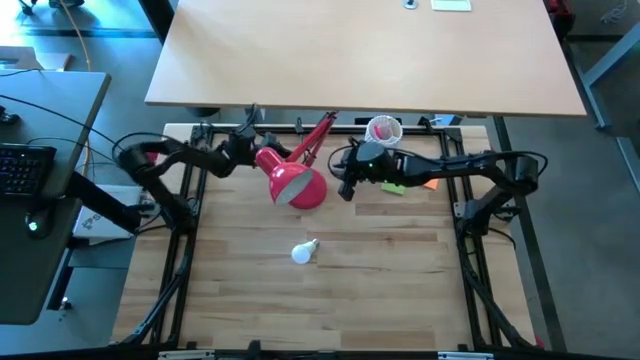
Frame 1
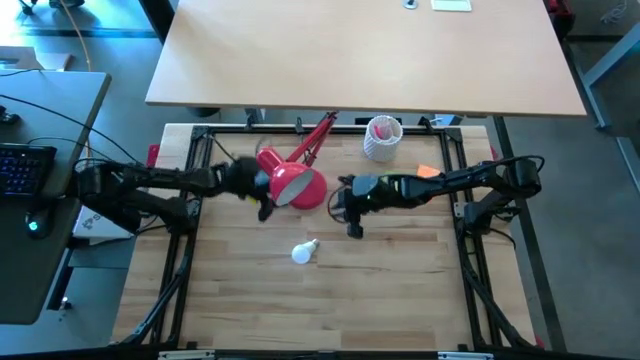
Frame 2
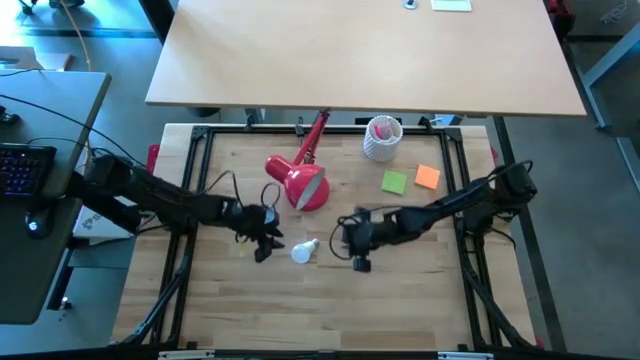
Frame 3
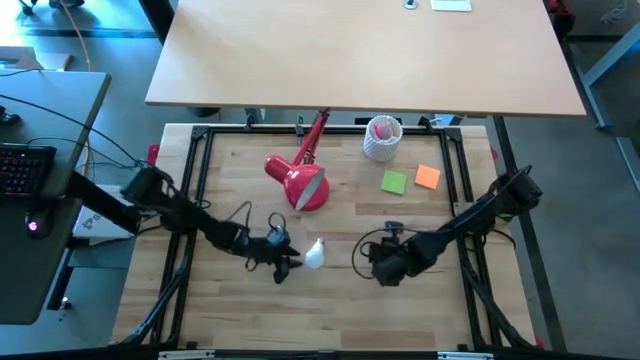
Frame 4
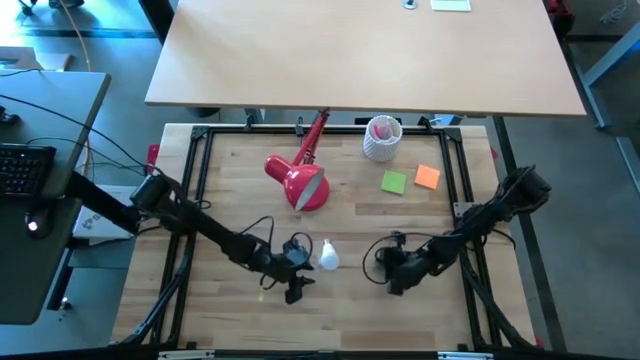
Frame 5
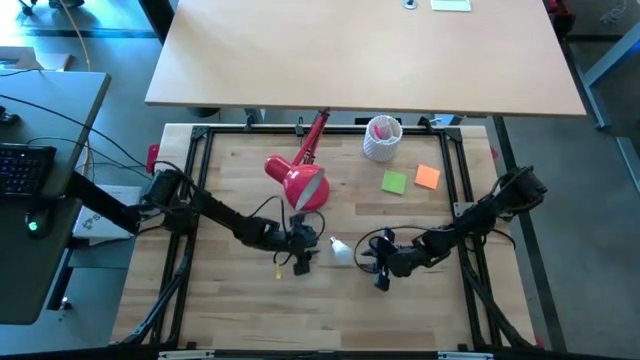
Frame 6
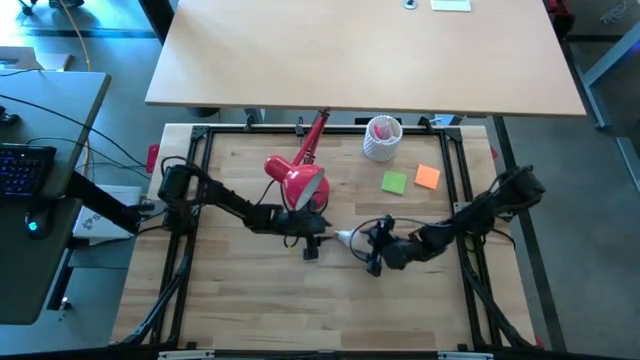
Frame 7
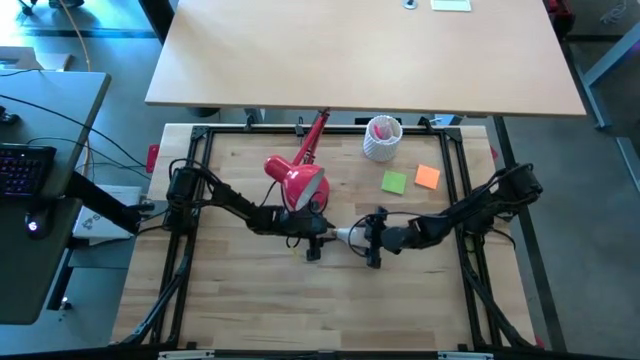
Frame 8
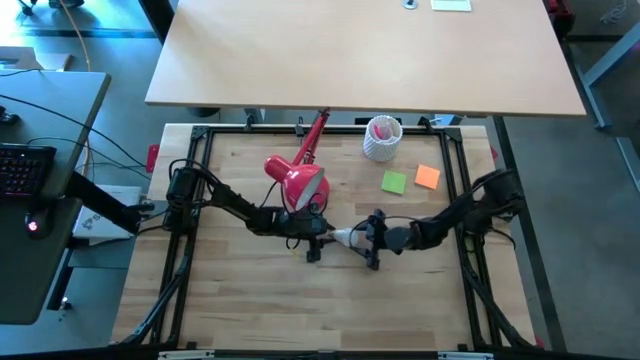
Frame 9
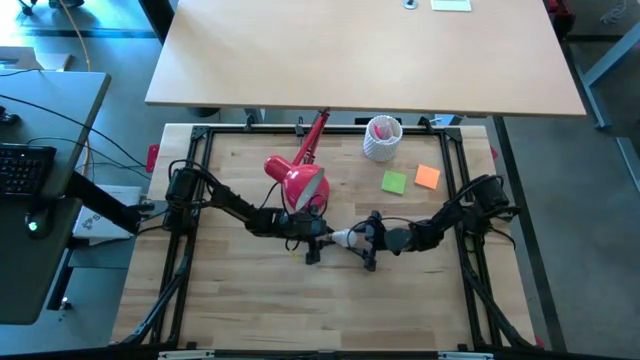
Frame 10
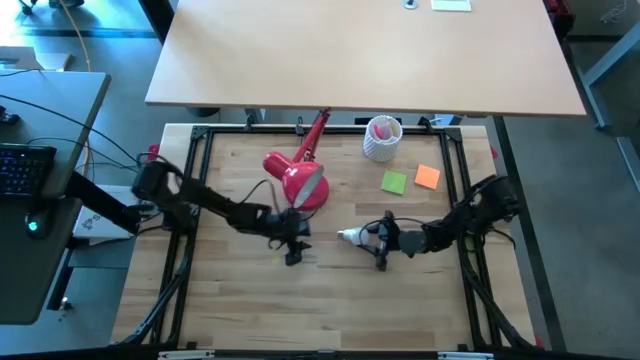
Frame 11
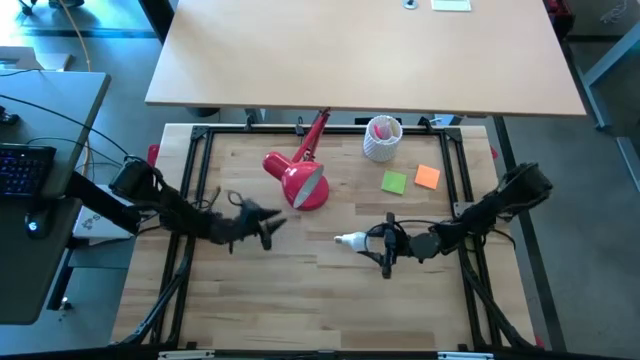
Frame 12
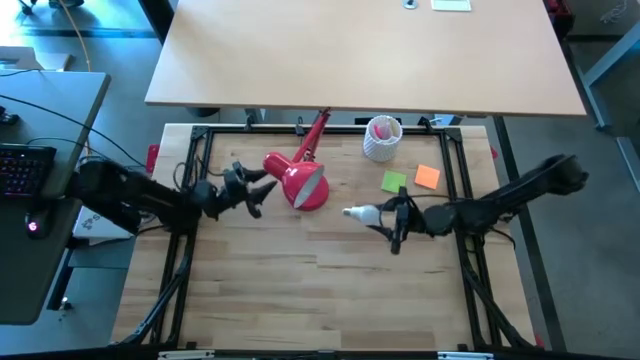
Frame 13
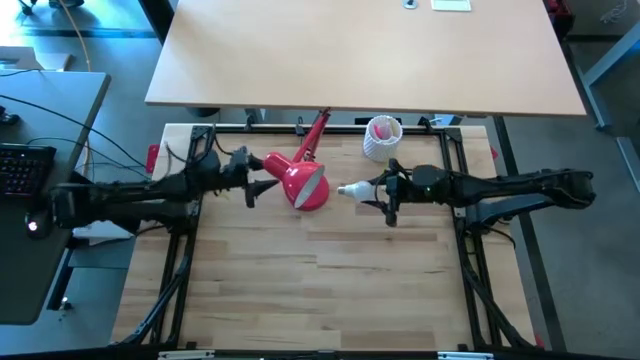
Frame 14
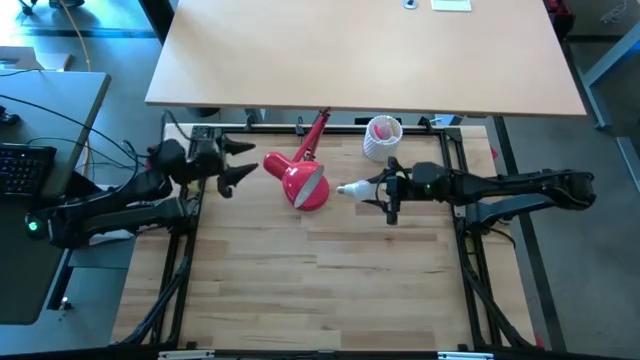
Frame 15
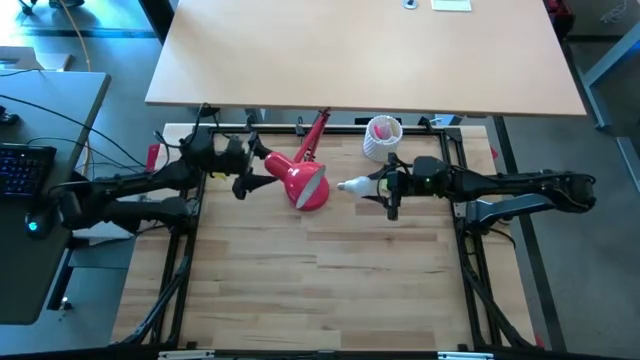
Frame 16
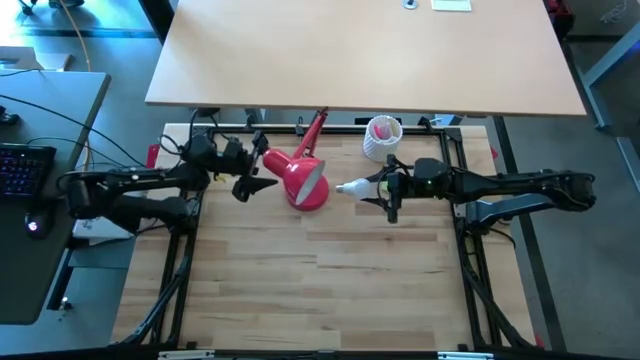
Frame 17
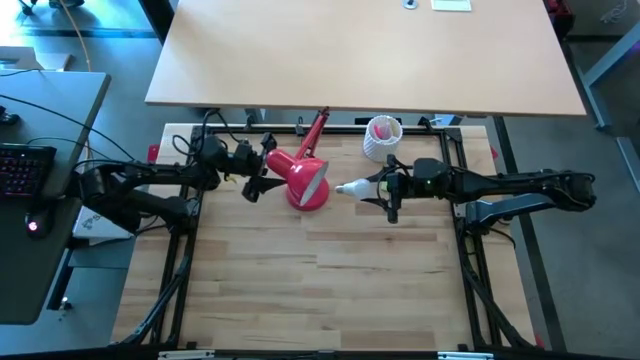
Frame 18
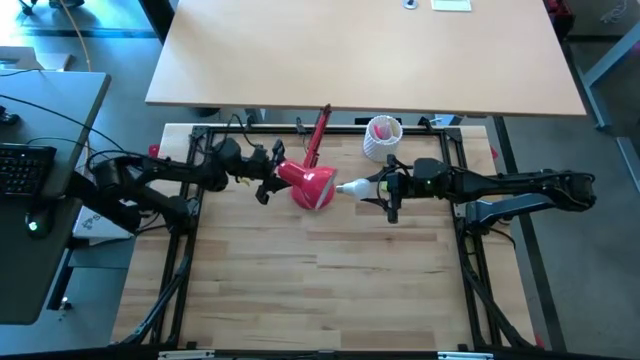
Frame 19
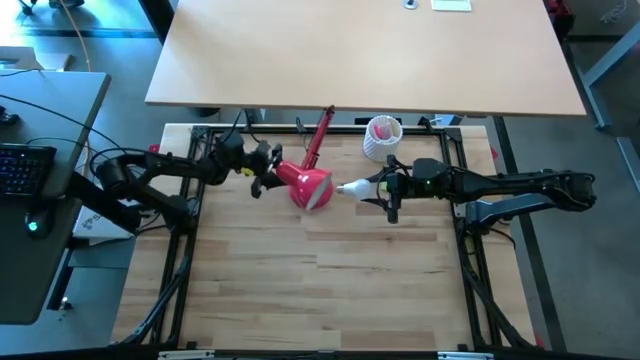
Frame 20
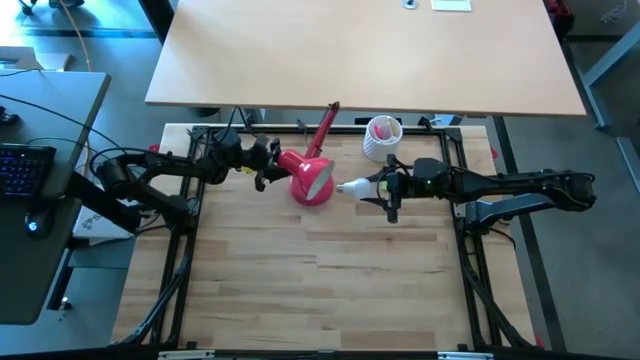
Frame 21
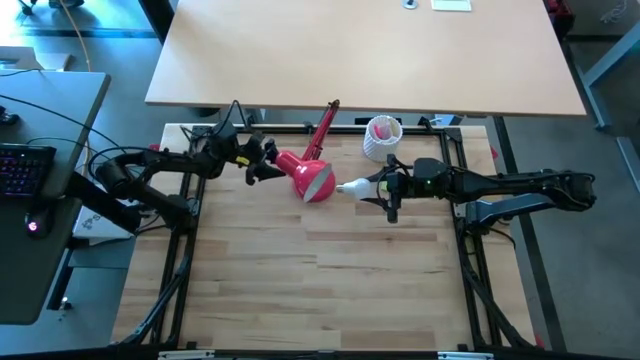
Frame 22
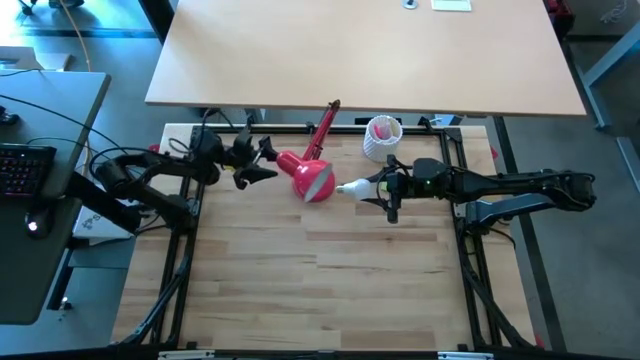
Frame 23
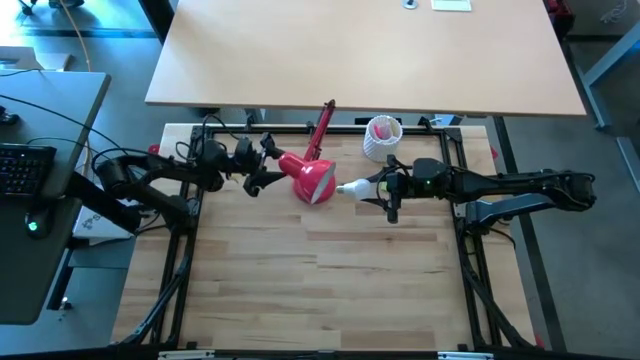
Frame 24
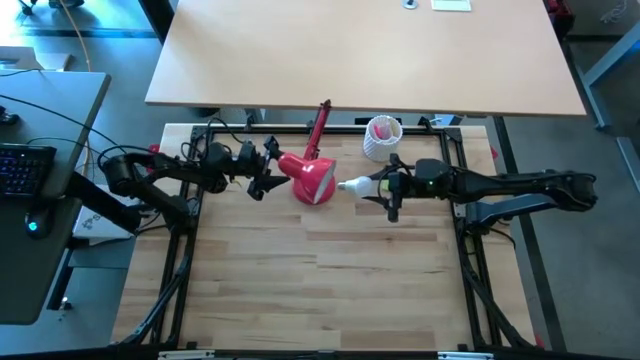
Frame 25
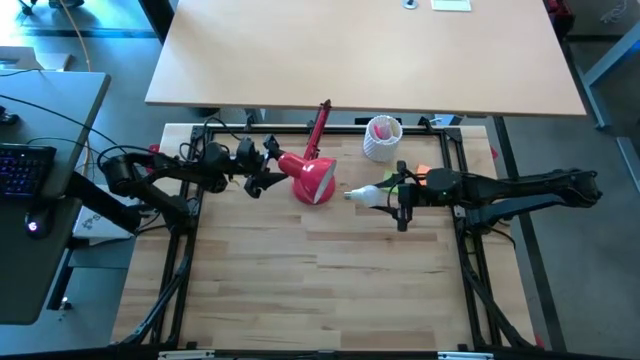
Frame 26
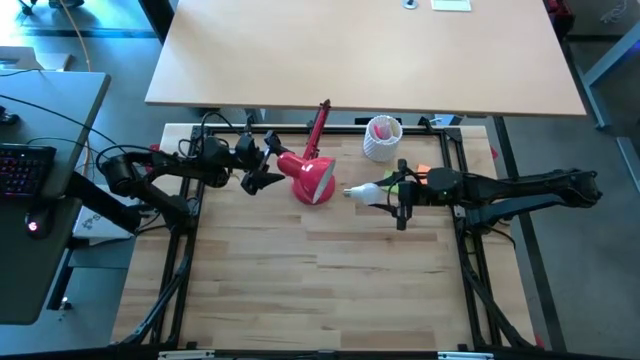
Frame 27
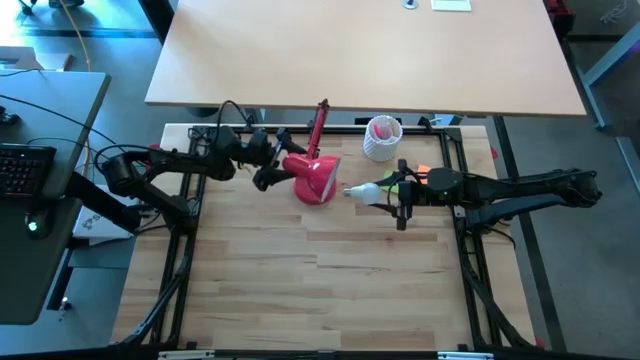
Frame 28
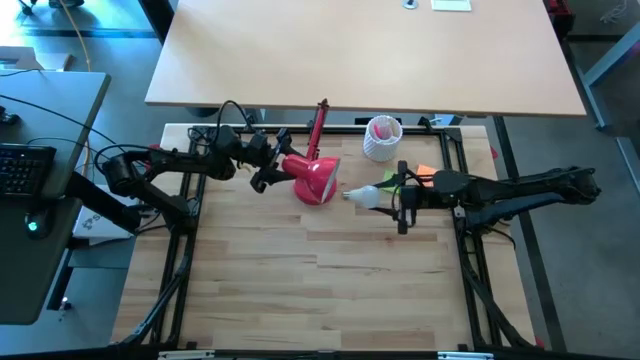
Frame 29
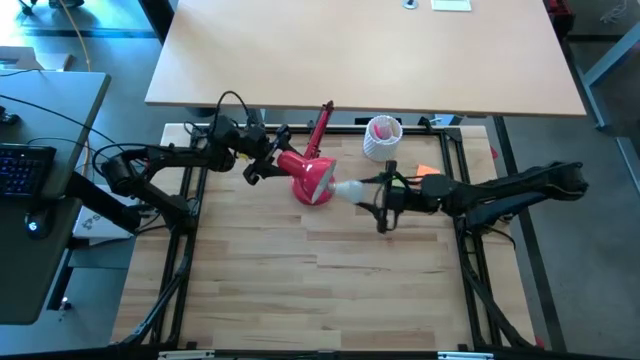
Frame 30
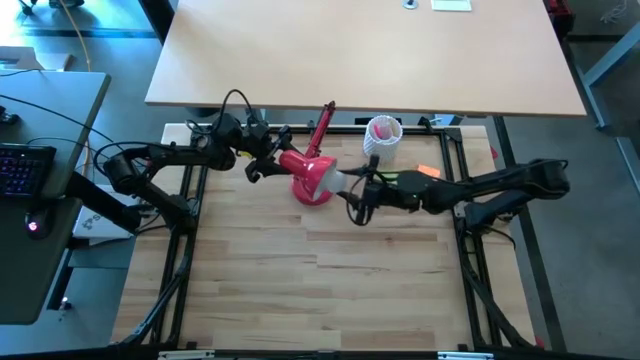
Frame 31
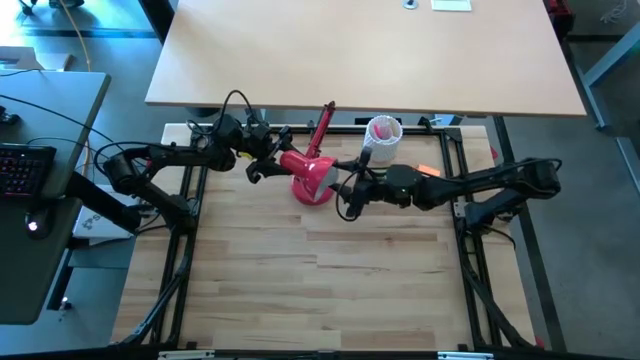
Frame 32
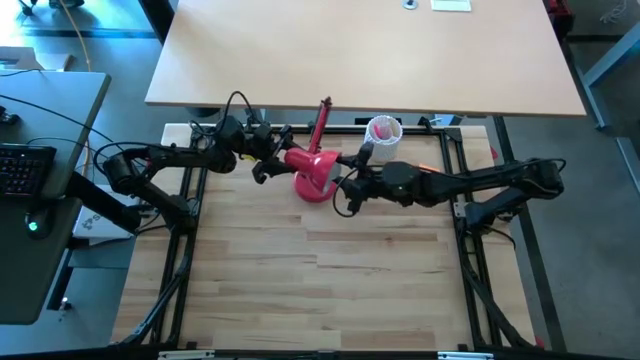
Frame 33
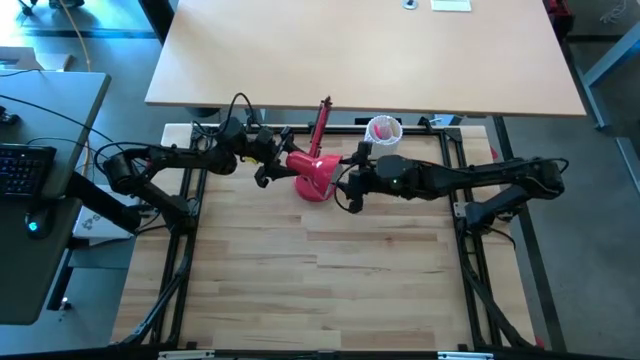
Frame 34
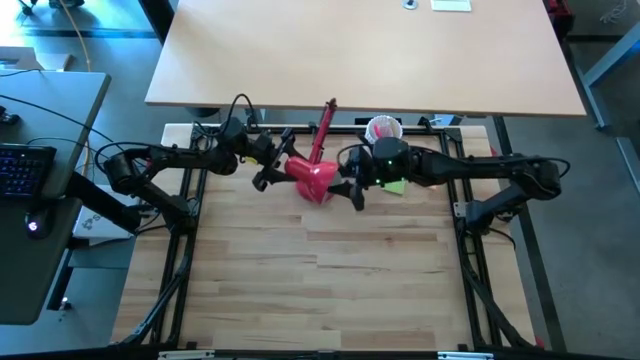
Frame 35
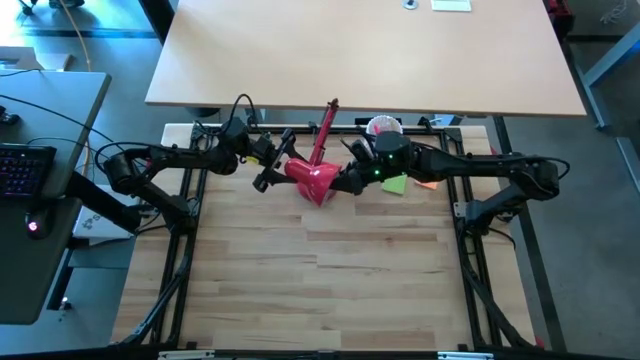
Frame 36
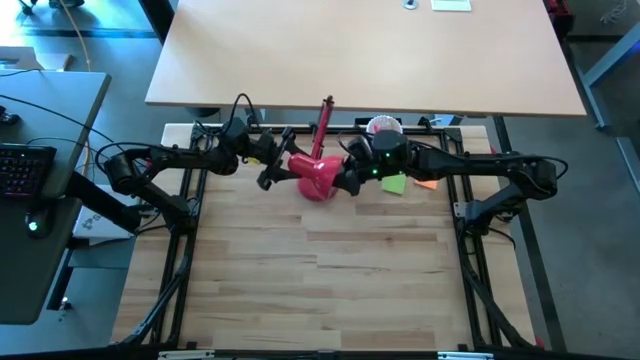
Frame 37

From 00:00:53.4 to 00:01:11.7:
Task: Screw lightbulb
Insert the lightbulb into the red lamp

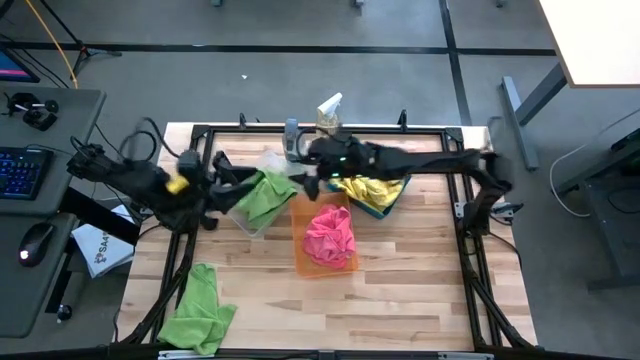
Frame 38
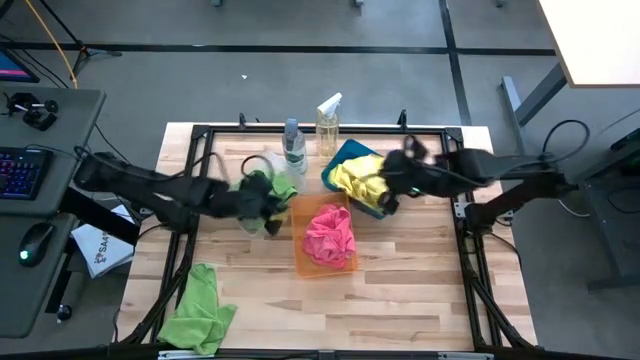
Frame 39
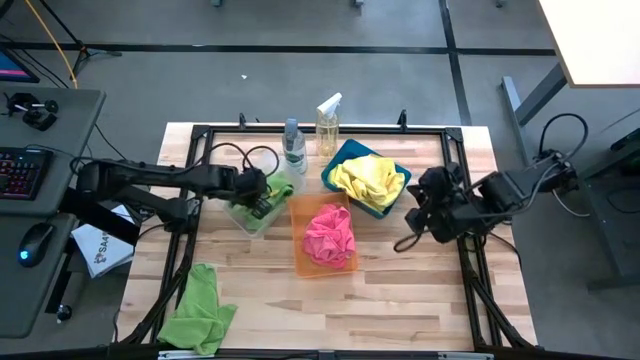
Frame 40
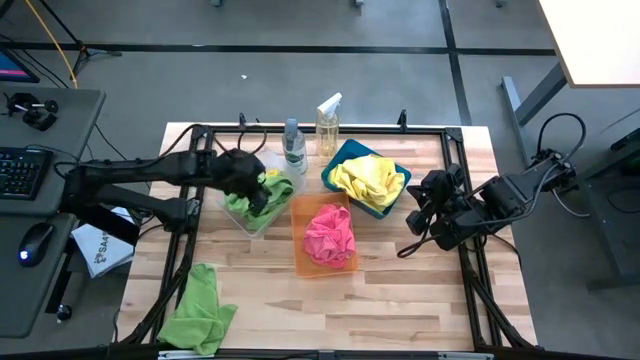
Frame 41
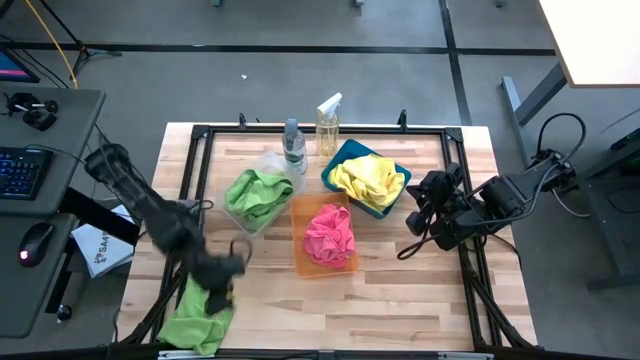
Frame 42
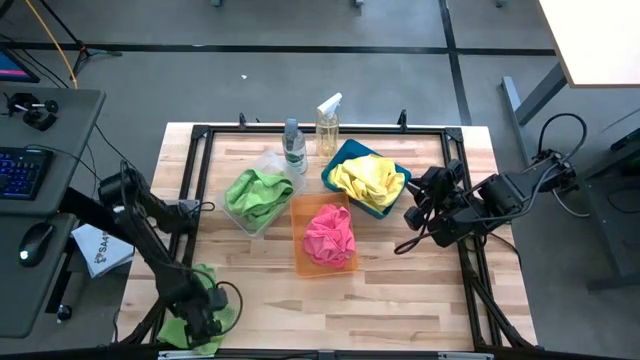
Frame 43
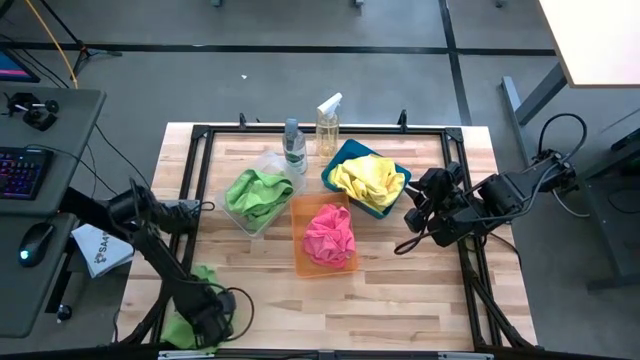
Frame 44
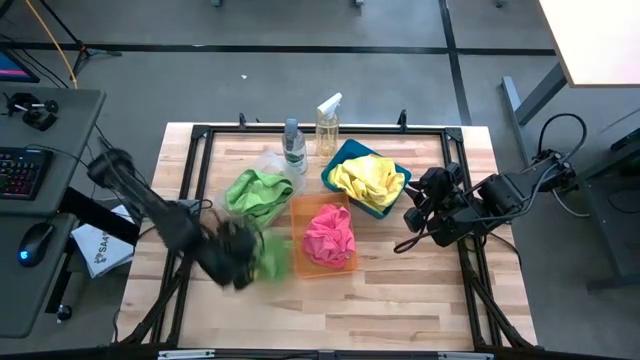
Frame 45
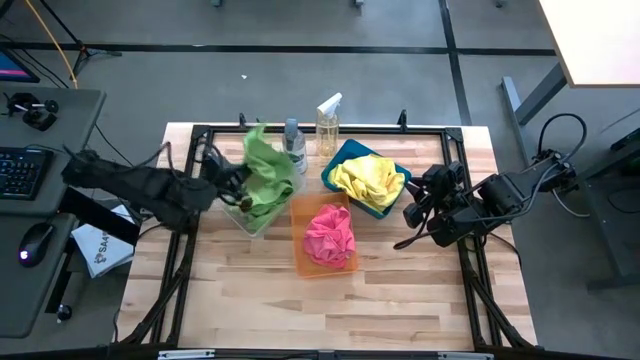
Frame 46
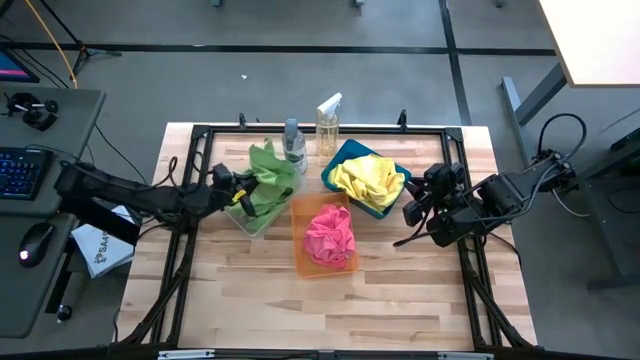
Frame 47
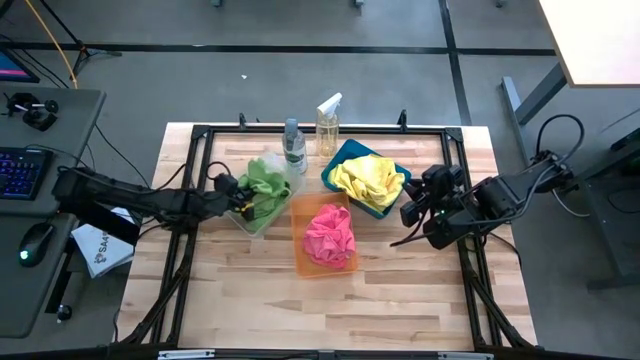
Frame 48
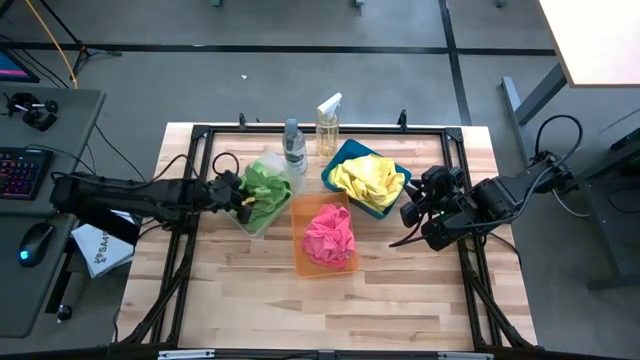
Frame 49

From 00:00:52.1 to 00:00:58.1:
Task: Sort microfiber towel by color & place in baskets
Put the green towel into the transparent bin
